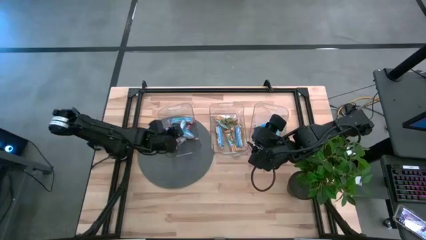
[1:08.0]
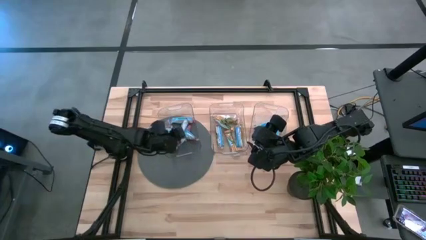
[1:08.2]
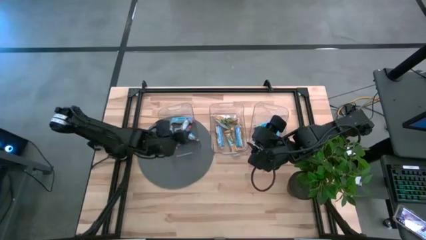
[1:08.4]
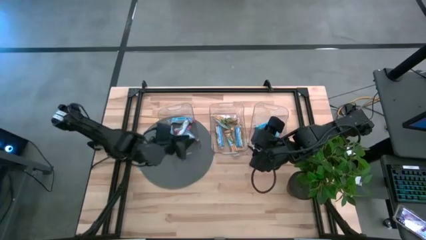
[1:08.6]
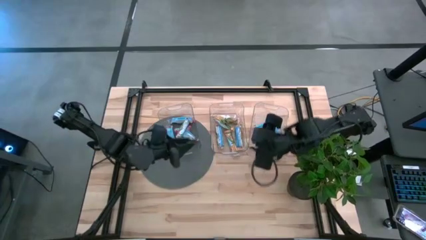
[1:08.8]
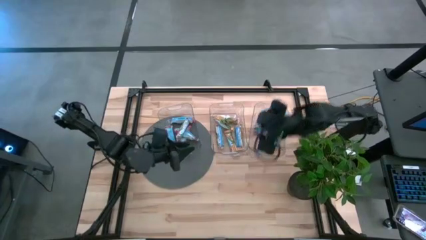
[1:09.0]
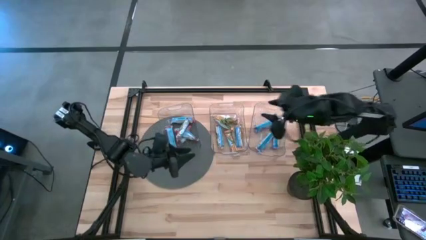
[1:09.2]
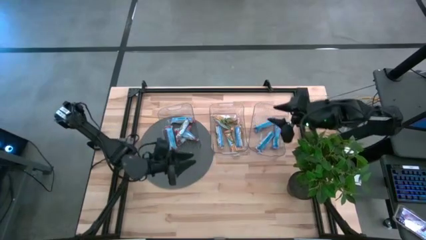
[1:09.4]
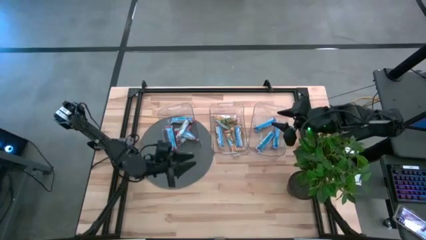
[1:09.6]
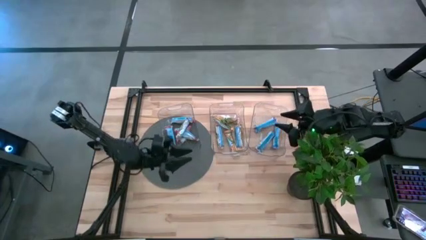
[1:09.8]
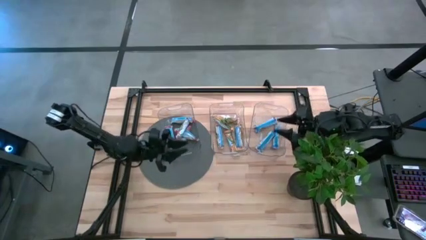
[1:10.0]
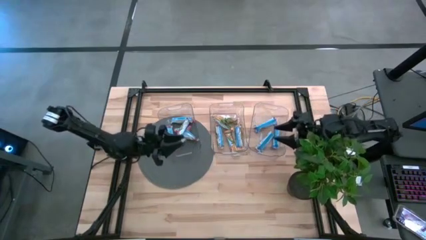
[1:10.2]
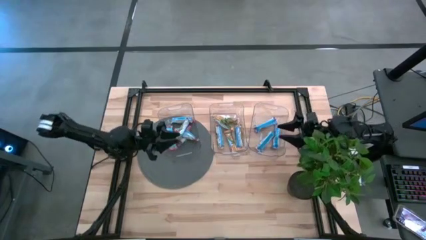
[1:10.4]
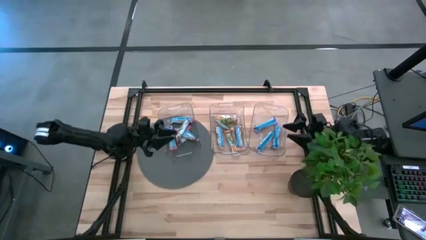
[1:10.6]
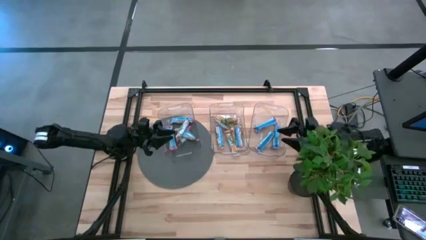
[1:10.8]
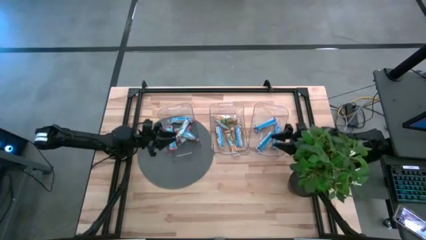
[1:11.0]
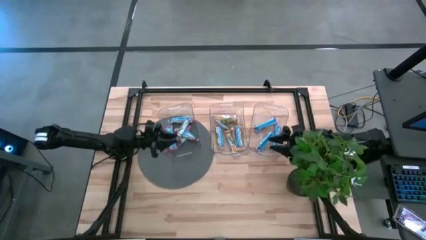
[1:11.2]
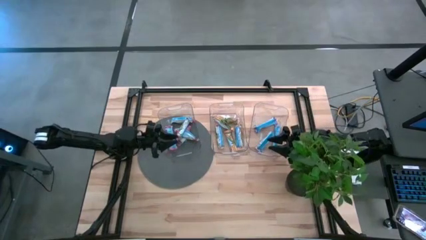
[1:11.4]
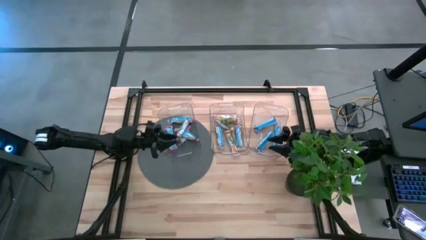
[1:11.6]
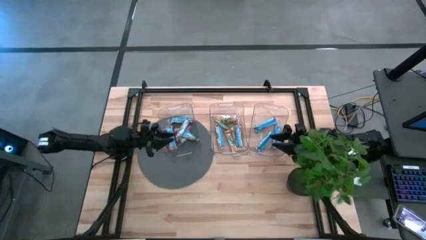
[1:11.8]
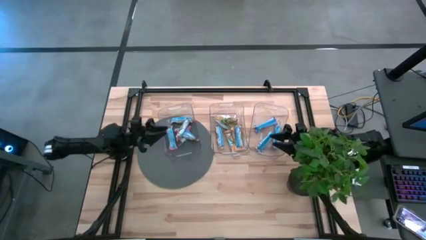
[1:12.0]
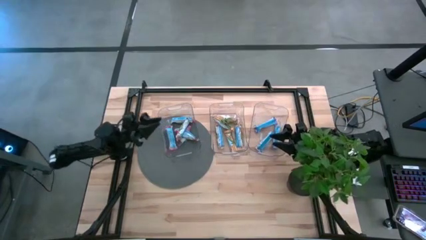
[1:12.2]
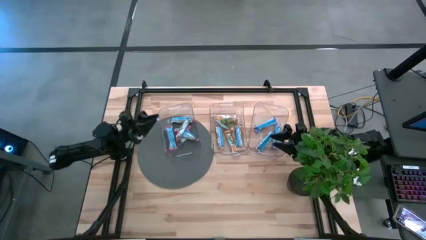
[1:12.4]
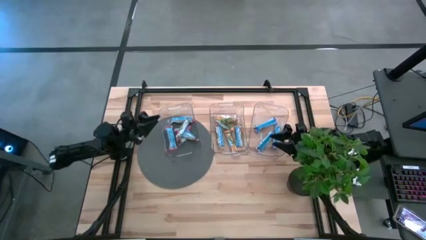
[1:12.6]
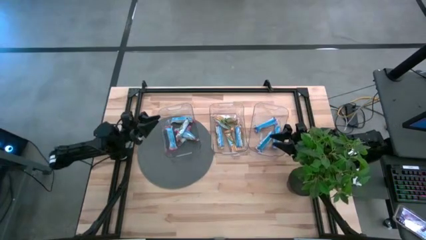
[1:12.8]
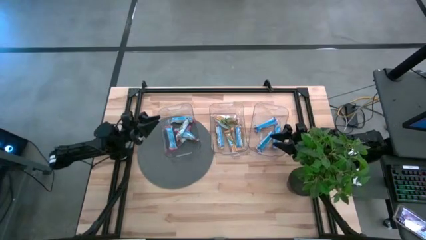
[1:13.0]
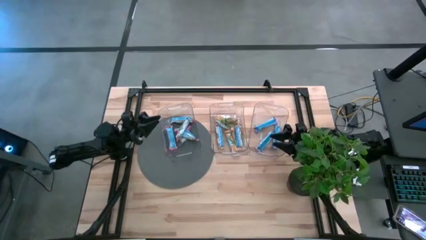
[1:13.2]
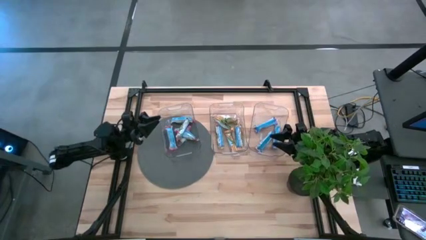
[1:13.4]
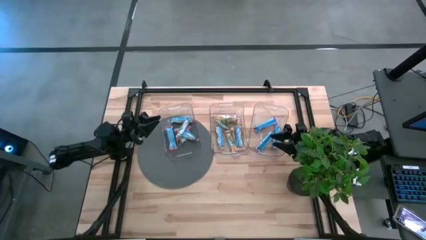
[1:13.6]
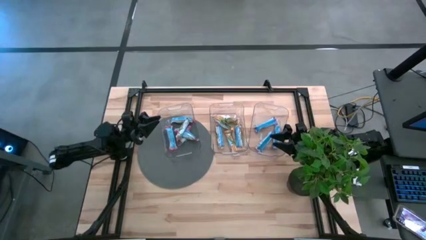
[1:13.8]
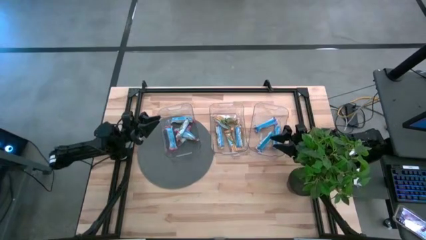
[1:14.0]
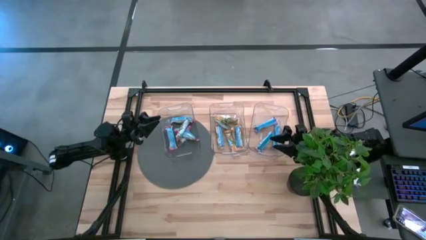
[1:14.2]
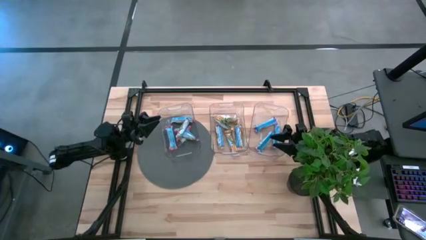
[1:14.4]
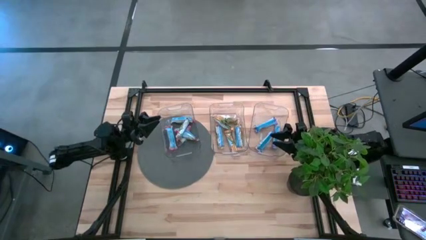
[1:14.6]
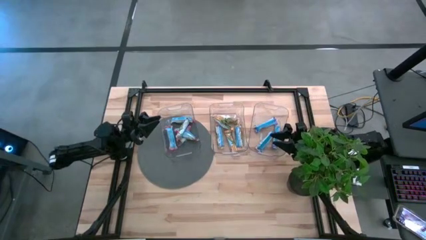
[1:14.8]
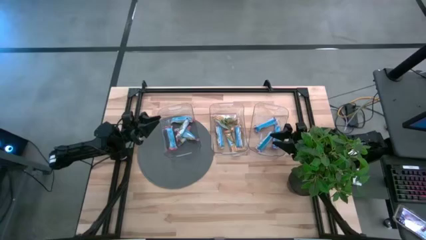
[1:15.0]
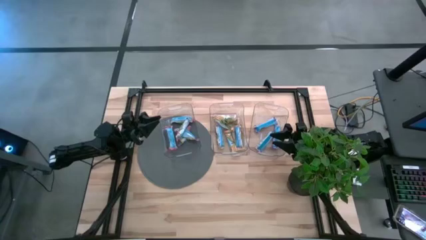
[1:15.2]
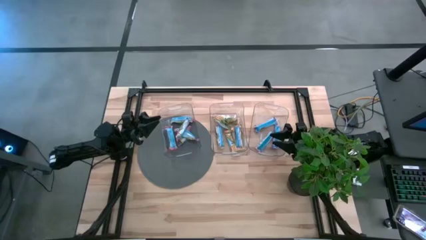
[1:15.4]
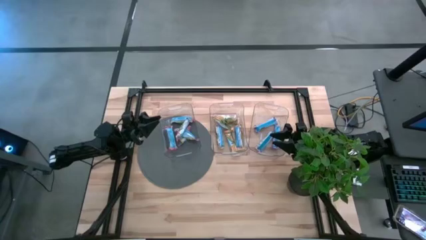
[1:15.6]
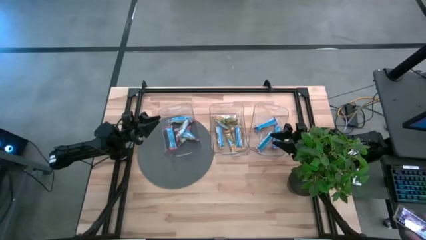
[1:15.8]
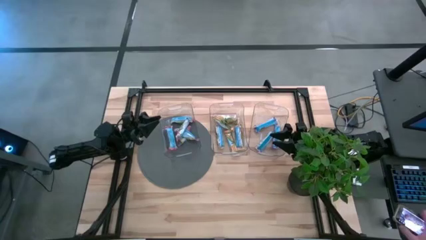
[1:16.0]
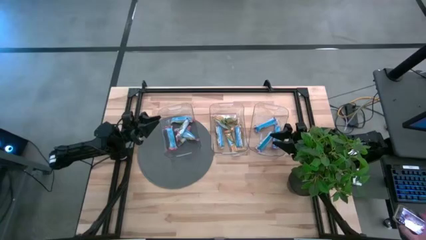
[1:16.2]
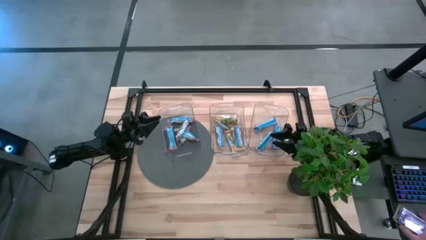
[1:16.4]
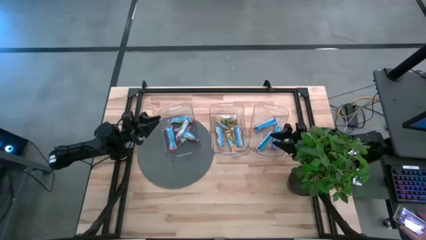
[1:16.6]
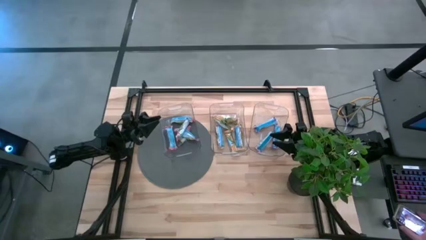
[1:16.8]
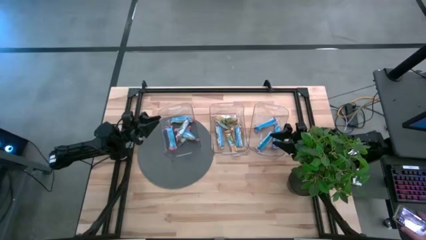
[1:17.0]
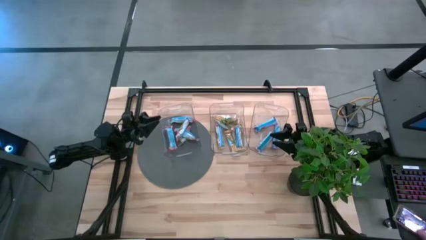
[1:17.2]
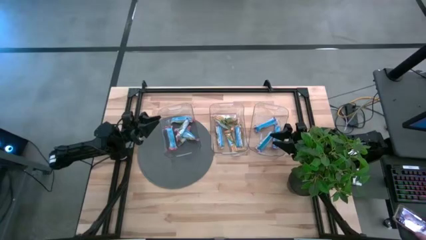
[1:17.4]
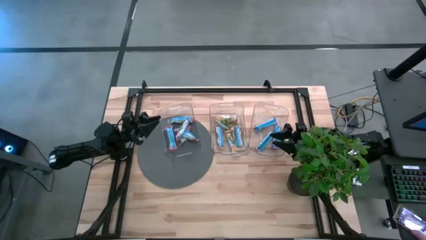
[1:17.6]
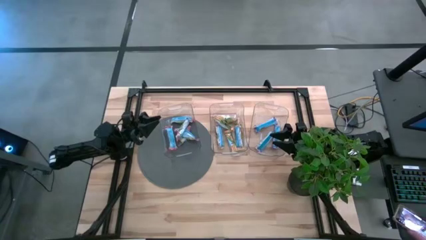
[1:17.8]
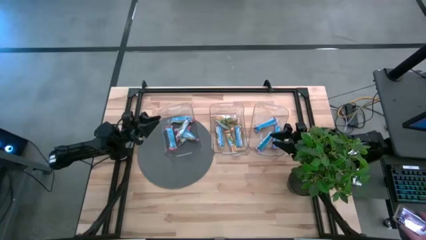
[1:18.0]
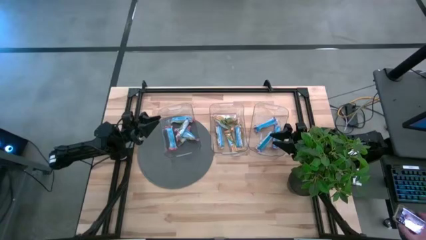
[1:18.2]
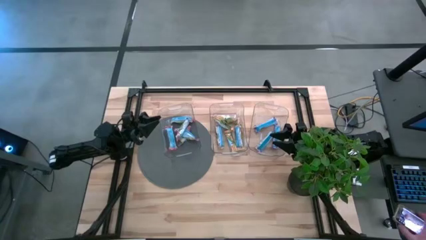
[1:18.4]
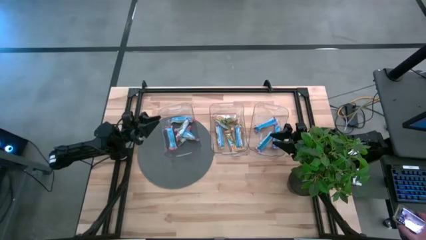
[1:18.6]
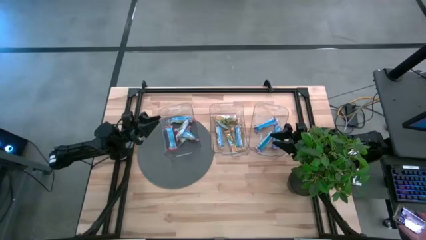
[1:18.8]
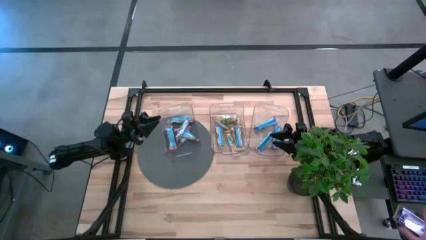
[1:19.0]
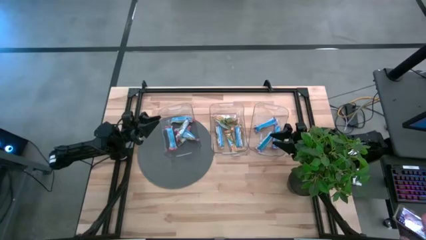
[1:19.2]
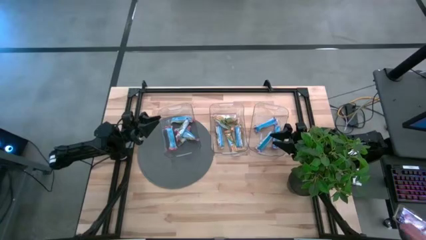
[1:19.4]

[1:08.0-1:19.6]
Task: Pick and place Granola Bars by type
Return to Home Position

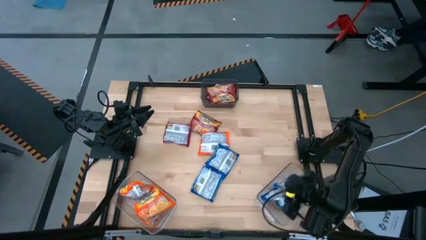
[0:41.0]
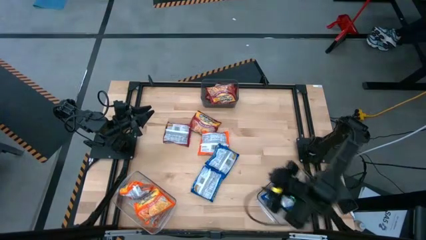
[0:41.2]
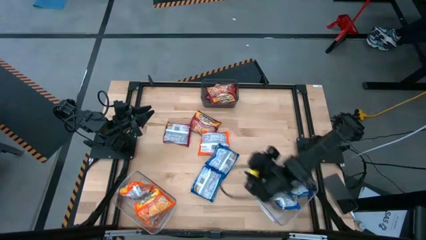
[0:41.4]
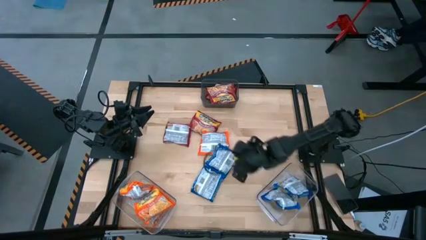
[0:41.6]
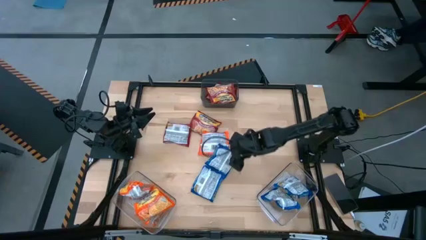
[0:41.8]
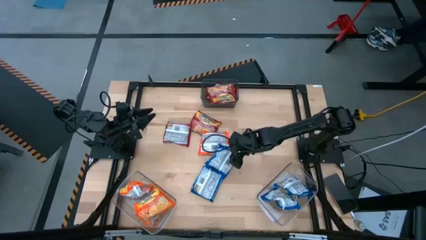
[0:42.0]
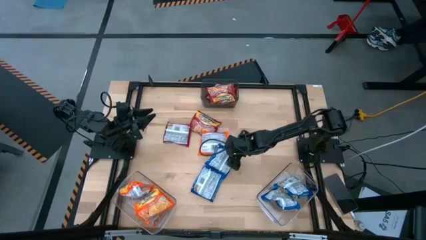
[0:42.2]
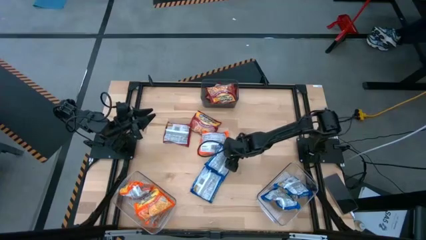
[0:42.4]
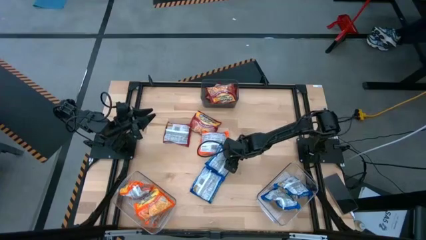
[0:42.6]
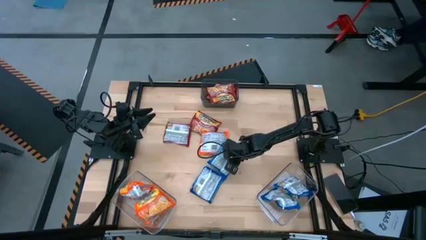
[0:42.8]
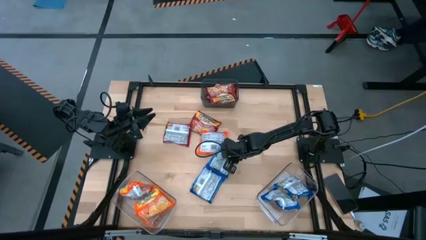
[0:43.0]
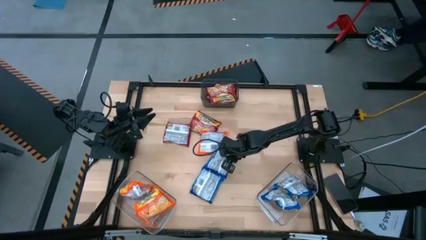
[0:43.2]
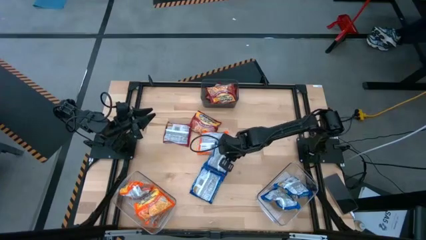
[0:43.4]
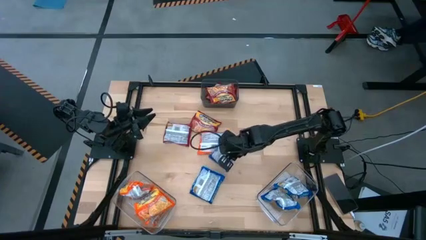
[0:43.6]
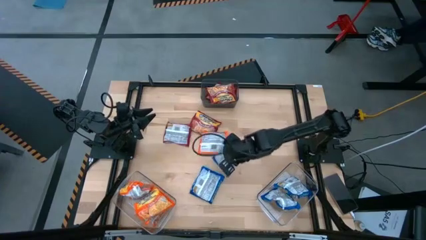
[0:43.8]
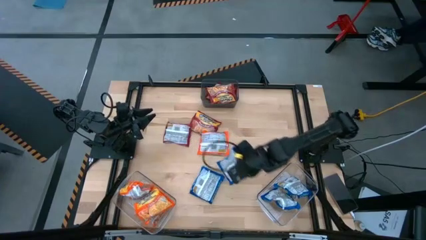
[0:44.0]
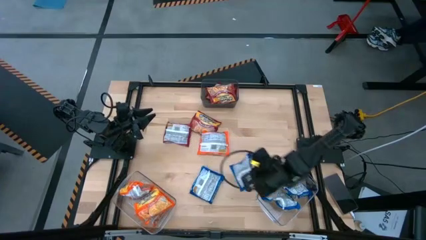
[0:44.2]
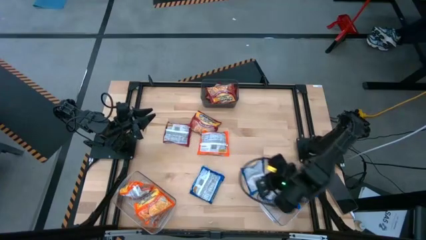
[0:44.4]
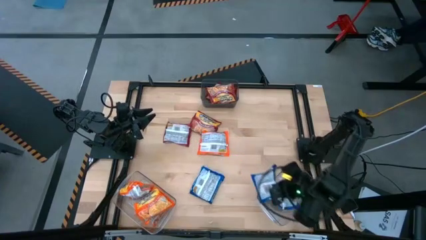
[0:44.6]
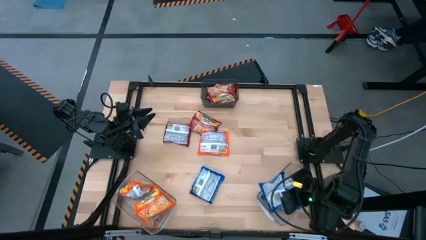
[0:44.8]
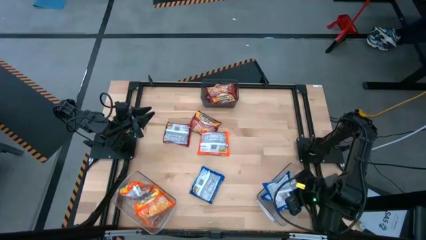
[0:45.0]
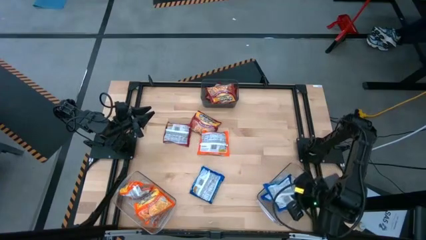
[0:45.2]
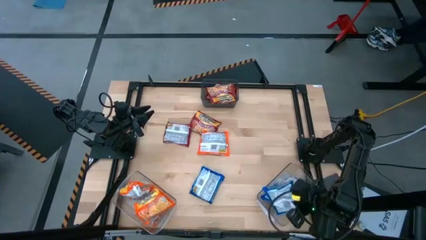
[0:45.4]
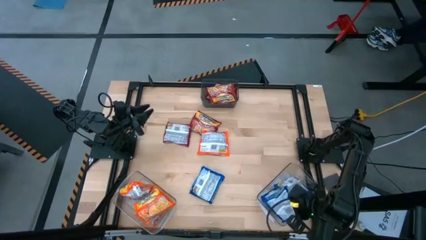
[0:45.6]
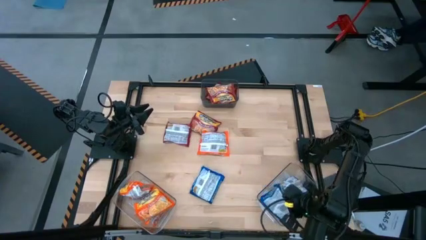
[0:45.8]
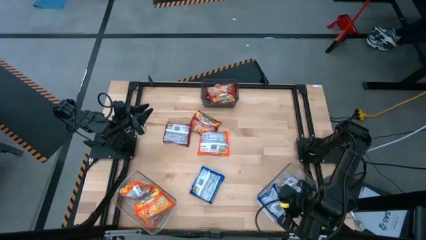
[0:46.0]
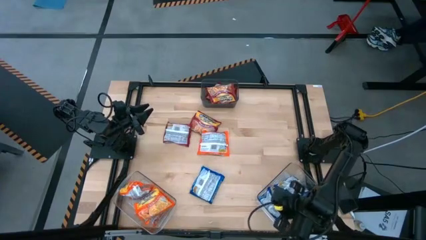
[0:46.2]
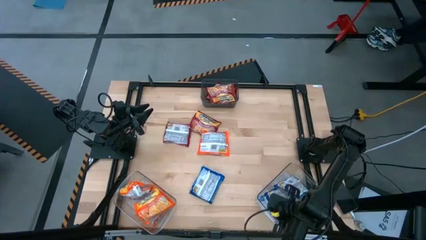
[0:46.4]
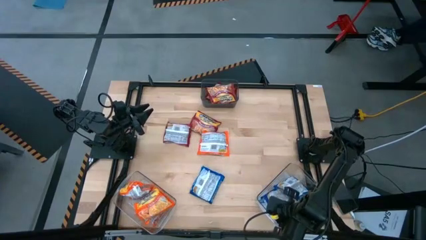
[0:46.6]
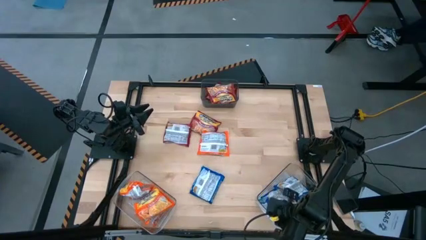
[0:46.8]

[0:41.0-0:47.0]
Task: Sort Maruchan noodles
Put the blue noodle pack into the right transparent bin
